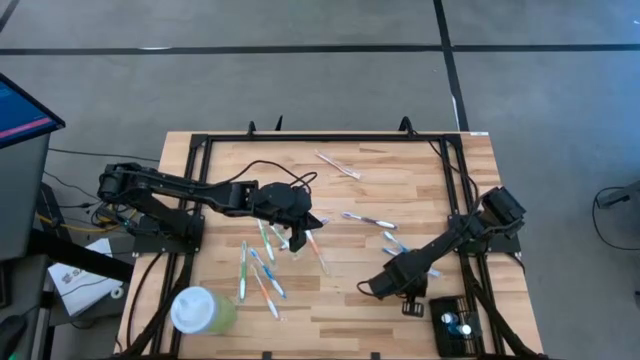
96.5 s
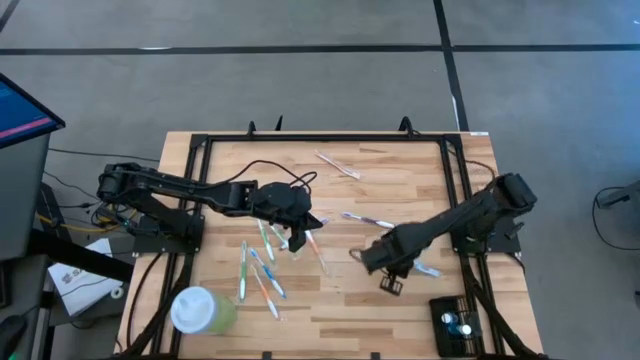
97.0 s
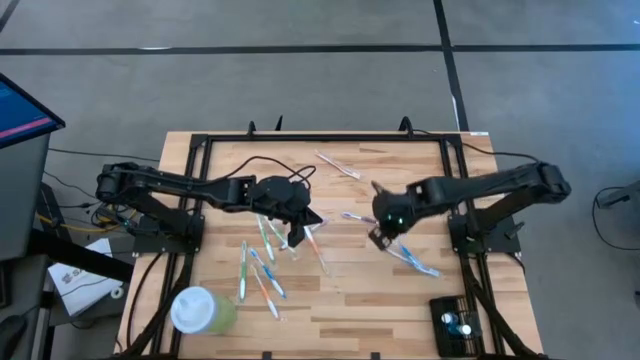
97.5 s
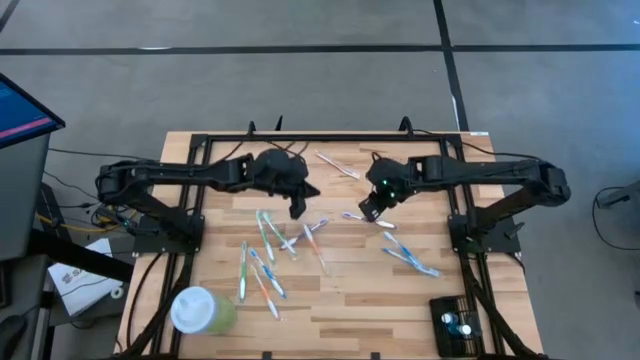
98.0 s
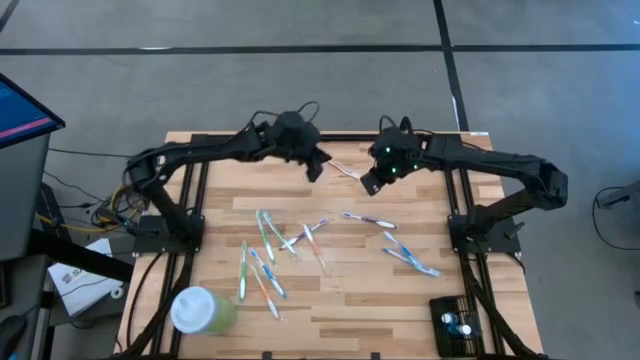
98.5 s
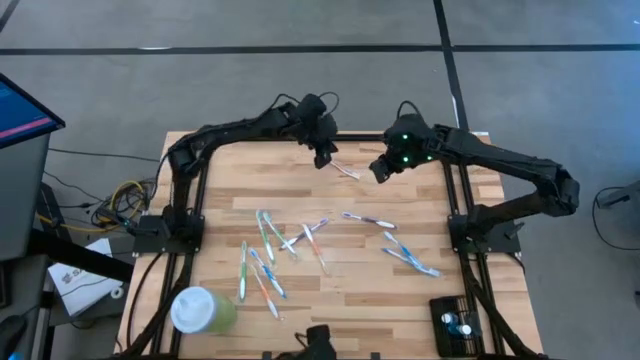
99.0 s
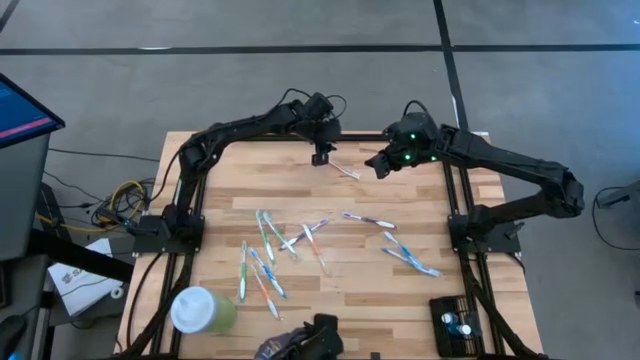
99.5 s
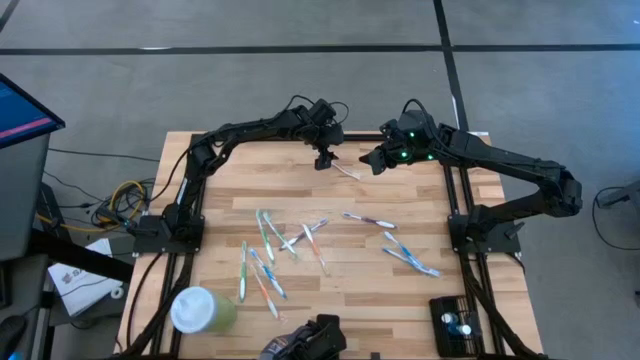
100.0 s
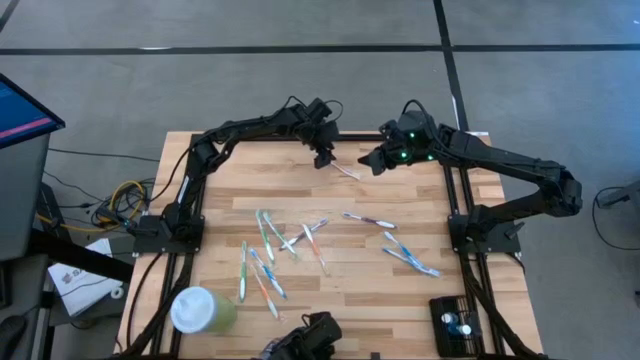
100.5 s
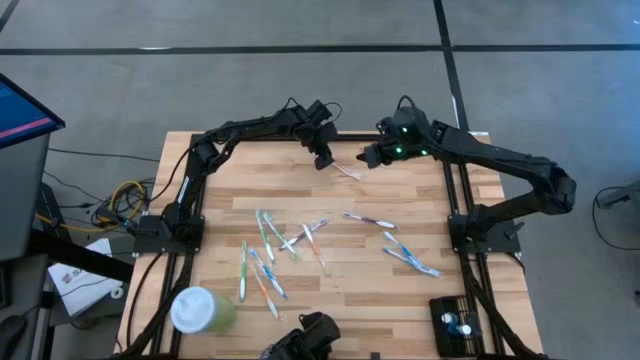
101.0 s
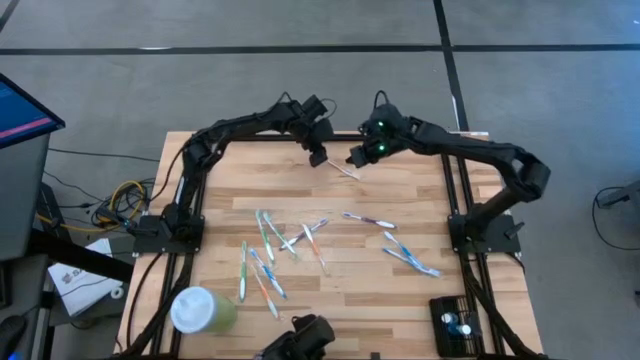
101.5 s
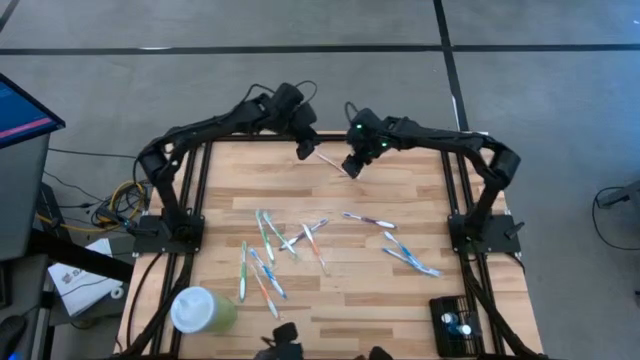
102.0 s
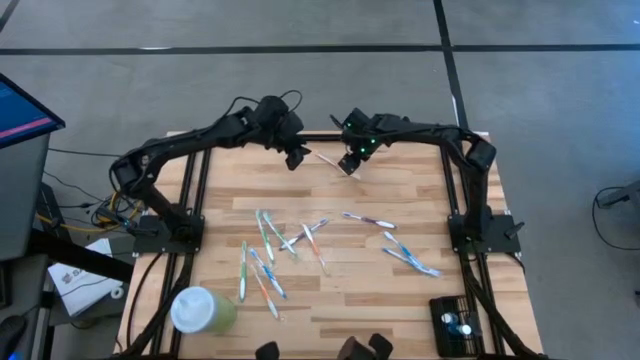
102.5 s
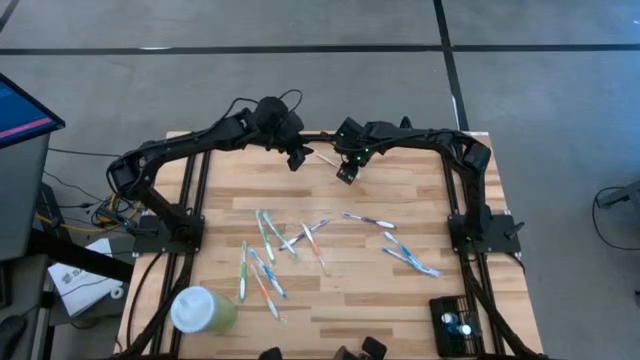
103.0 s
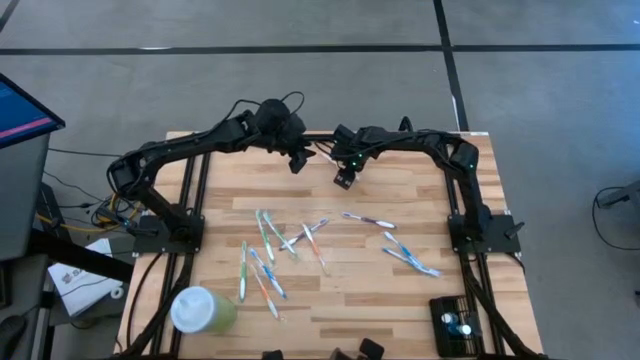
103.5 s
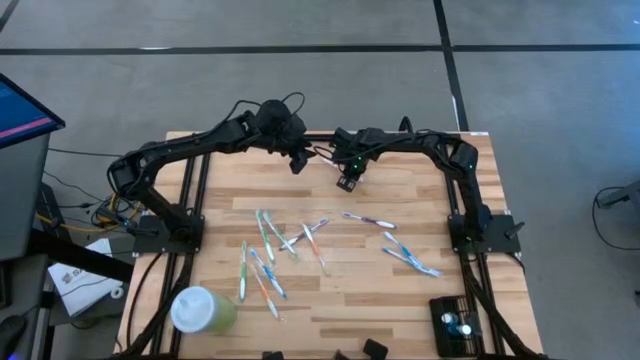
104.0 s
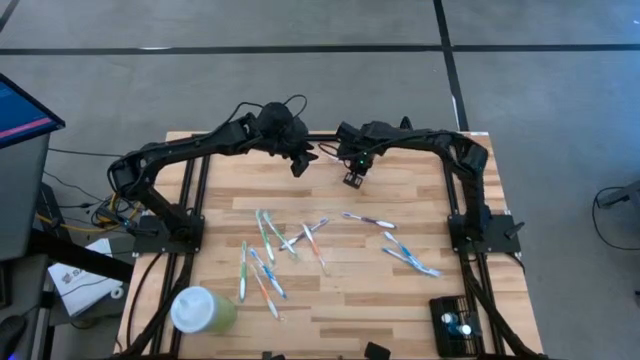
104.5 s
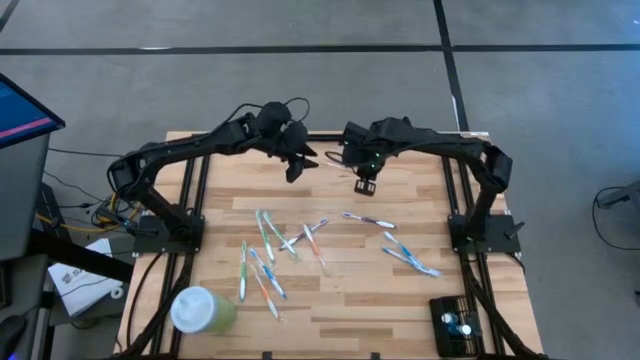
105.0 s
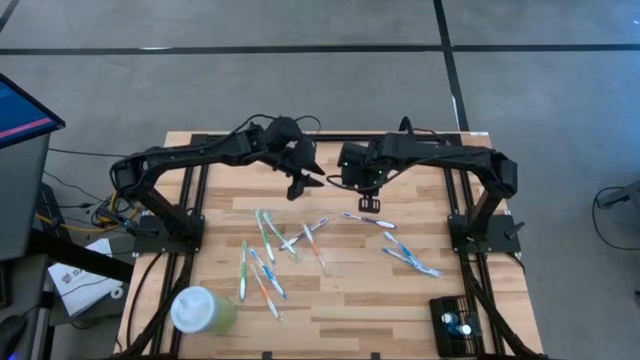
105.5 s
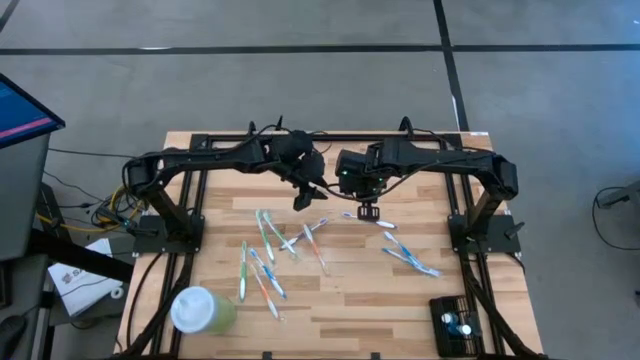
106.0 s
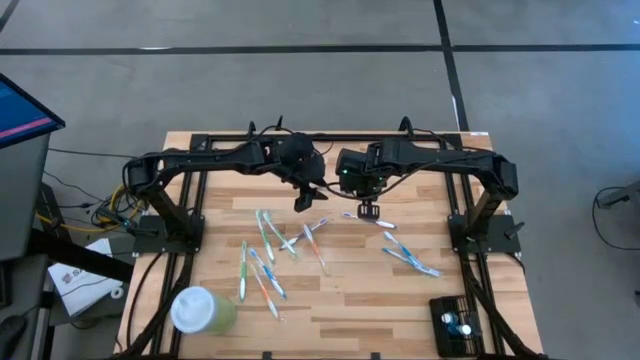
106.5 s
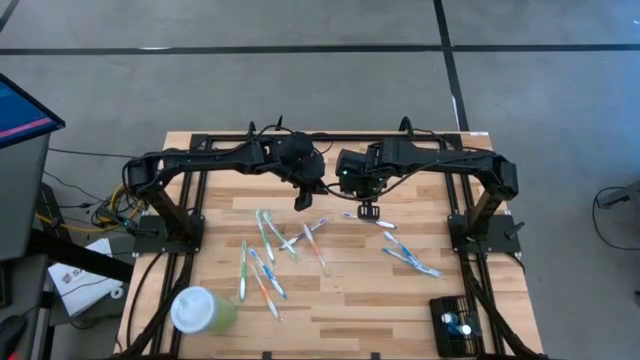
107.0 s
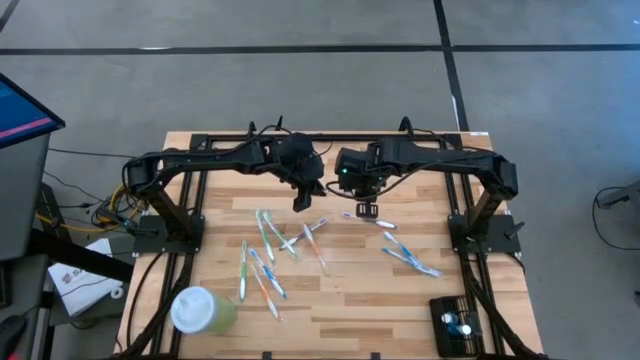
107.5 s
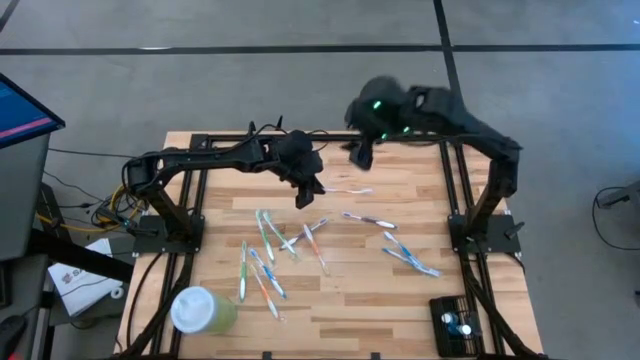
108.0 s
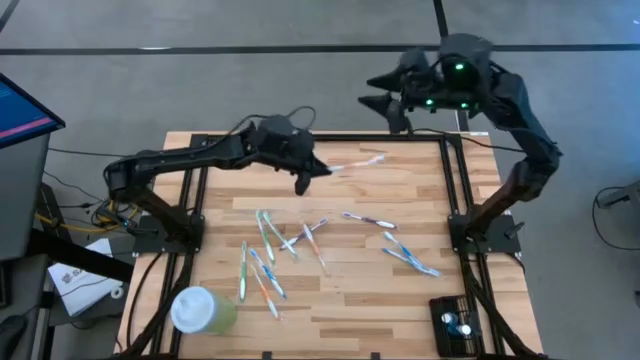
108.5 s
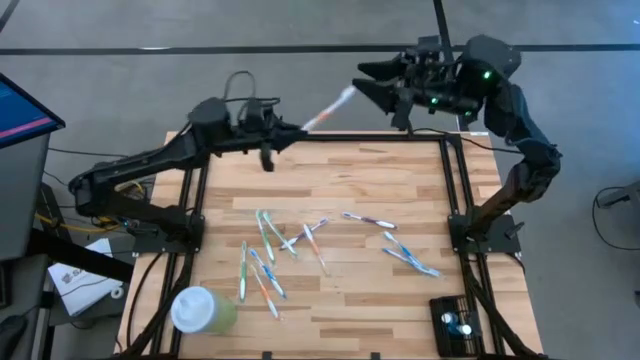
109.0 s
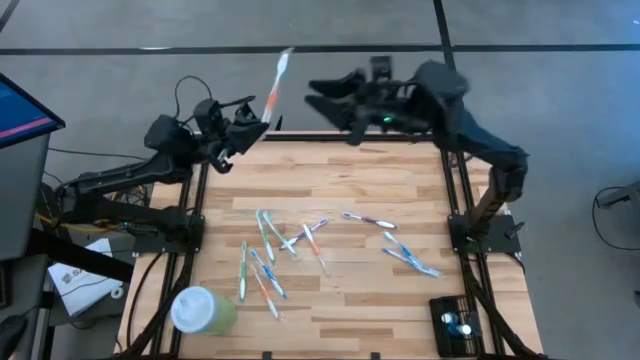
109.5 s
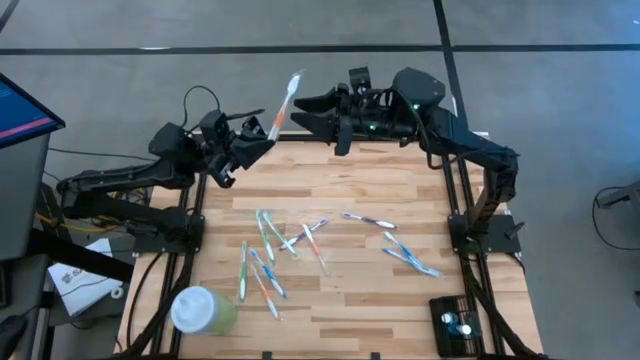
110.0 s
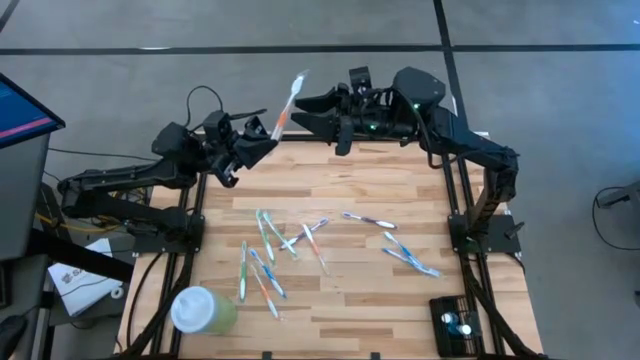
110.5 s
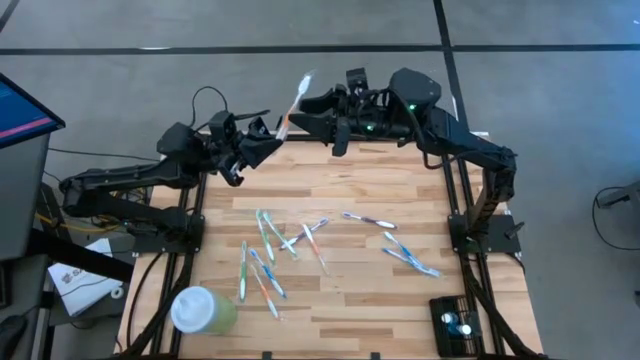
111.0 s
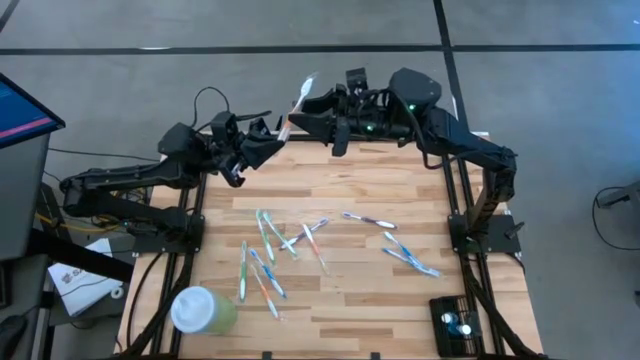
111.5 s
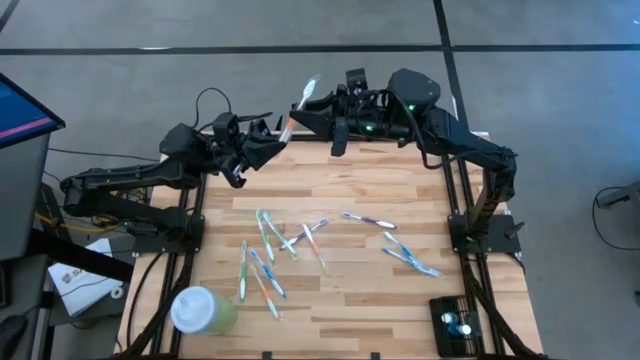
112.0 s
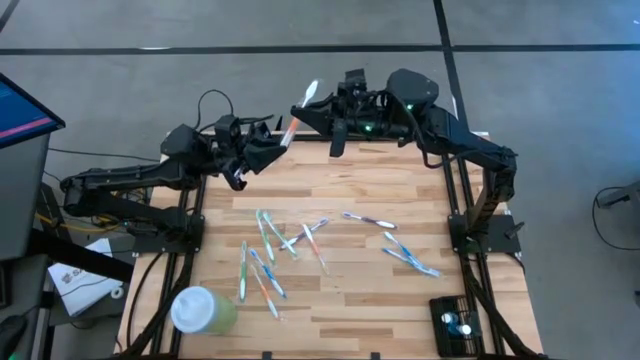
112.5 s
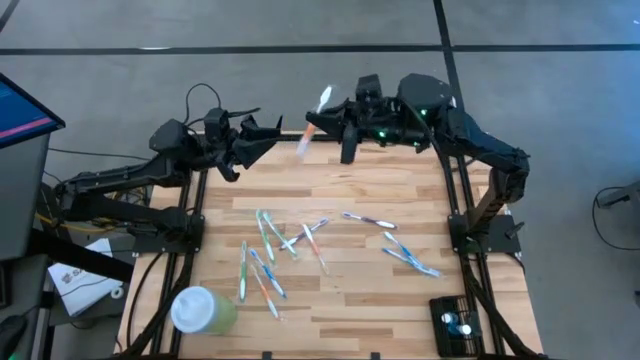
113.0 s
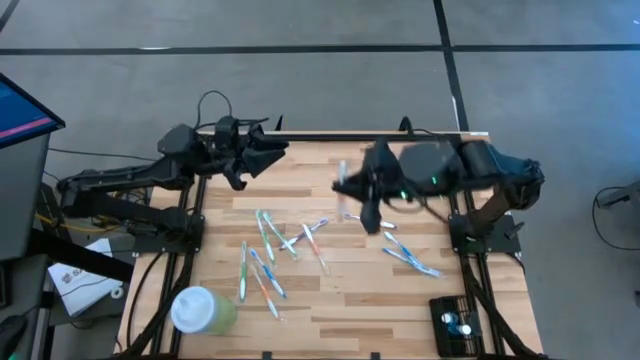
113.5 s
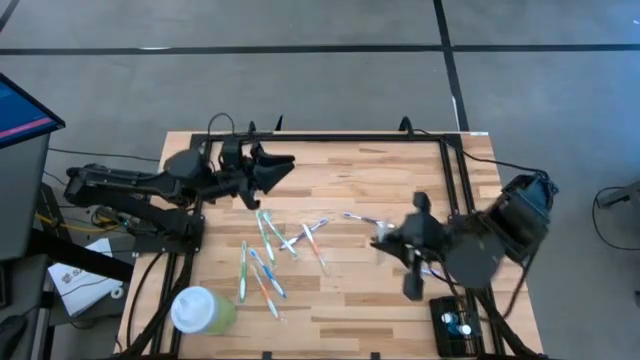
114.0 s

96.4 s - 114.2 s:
Task: Pick & Place toothbrushing station
Put the top orange toothbrush into the black organizer

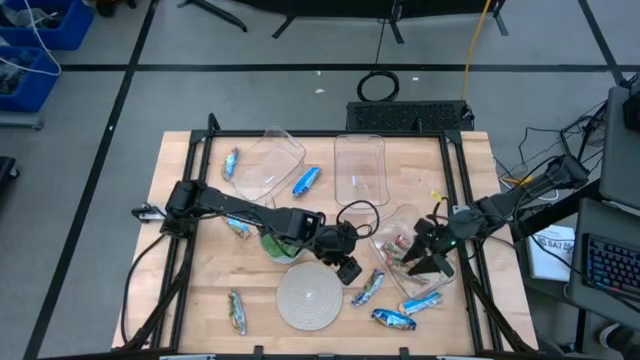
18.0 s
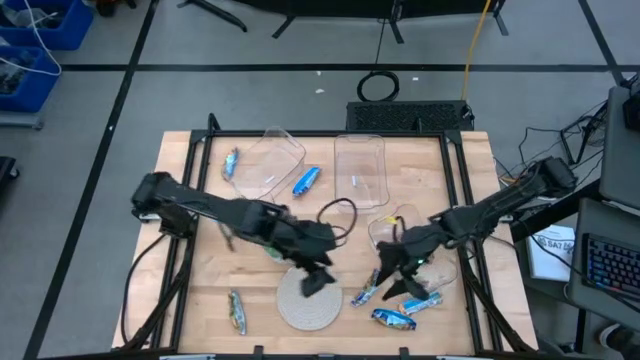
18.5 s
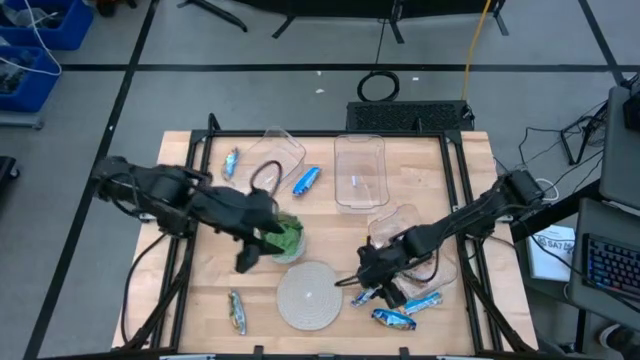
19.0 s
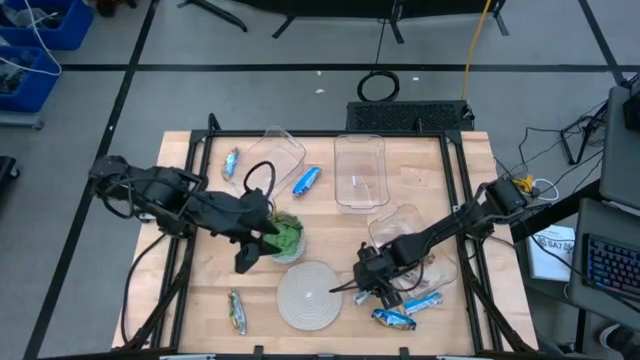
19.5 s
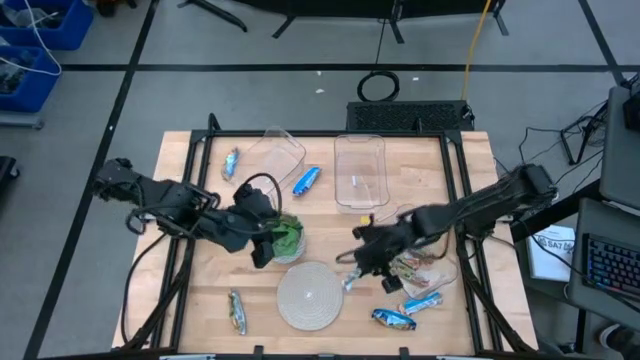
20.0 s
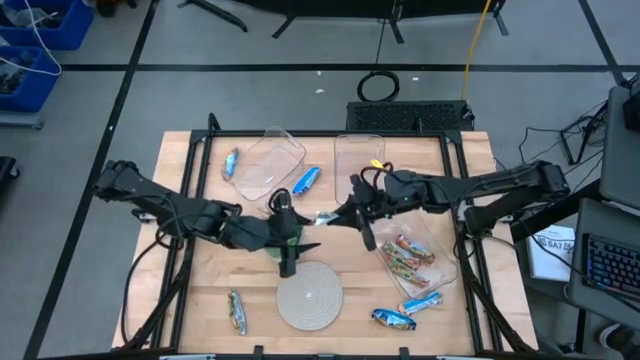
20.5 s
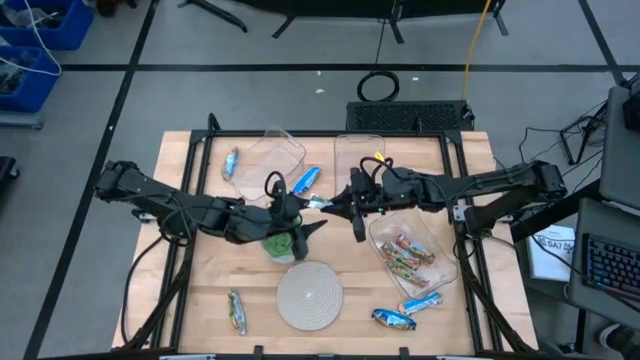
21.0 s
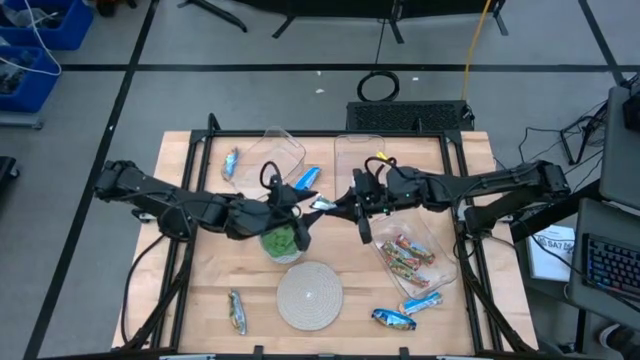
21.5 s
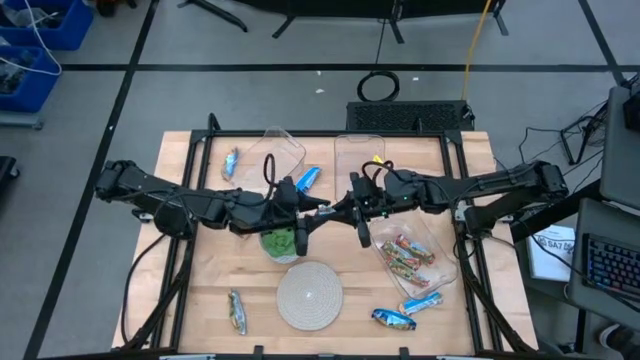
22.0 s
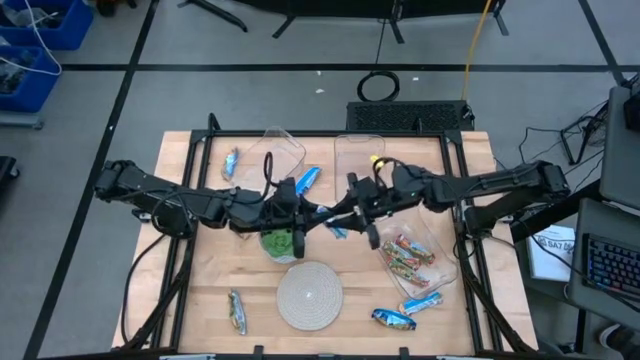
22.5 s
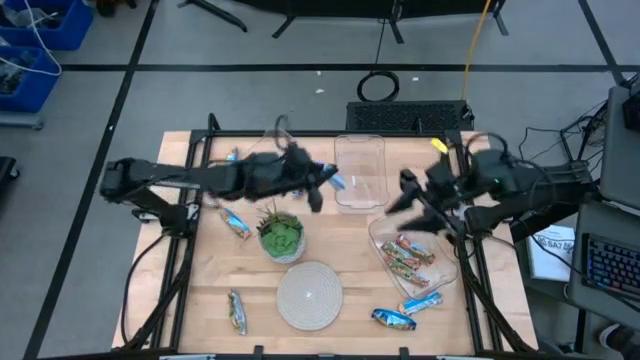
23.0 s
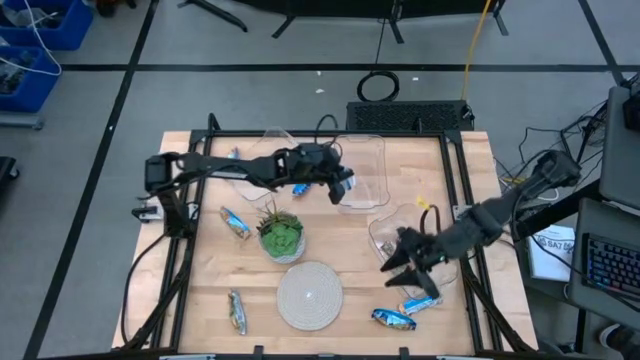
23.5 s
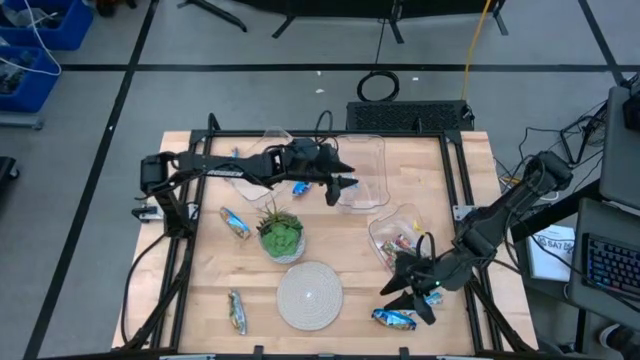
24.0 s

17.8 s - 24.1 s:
Task: Pick and place Granola Bars by type
Put the blue granola bar into the top right transparent bin
